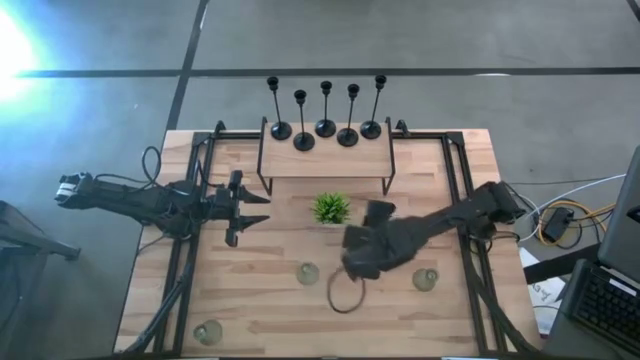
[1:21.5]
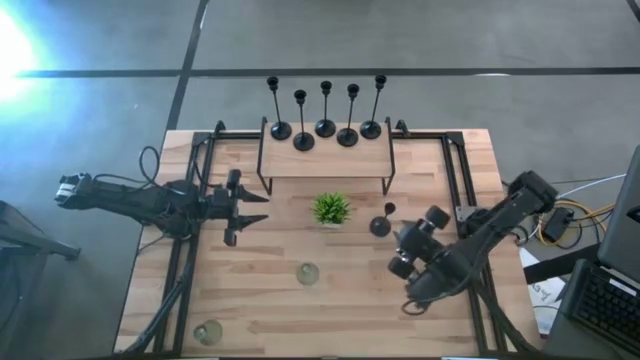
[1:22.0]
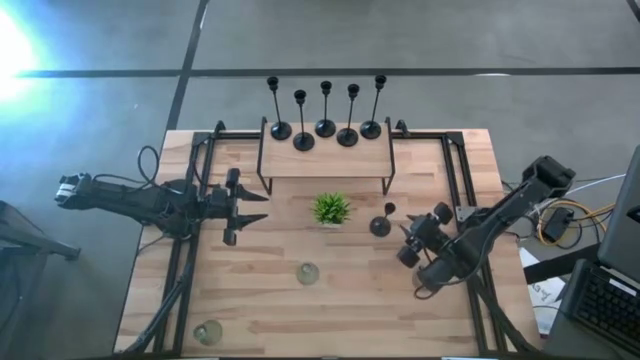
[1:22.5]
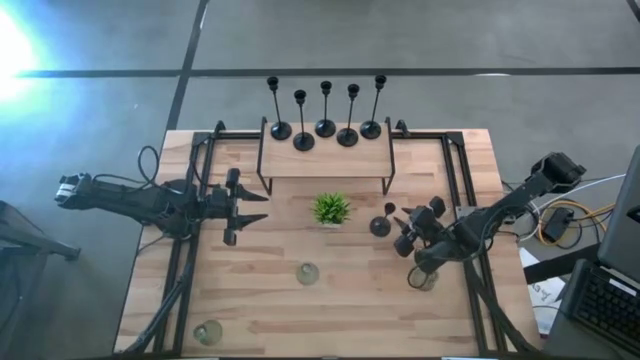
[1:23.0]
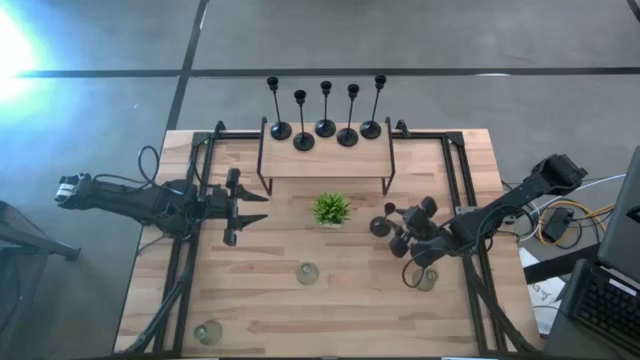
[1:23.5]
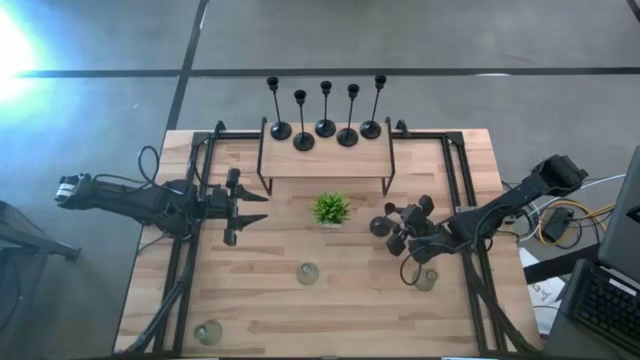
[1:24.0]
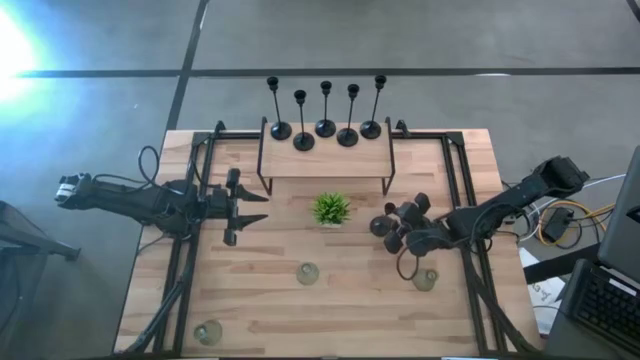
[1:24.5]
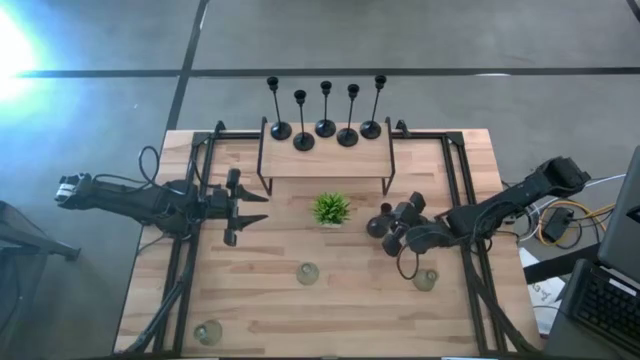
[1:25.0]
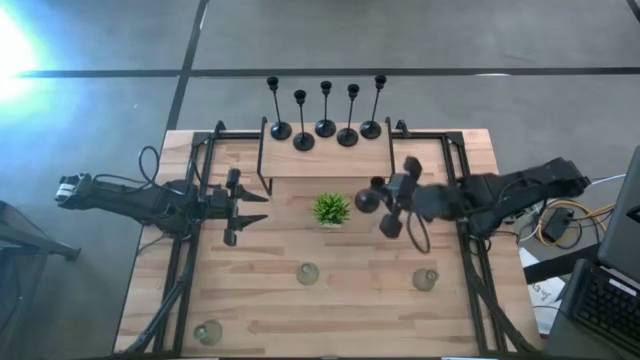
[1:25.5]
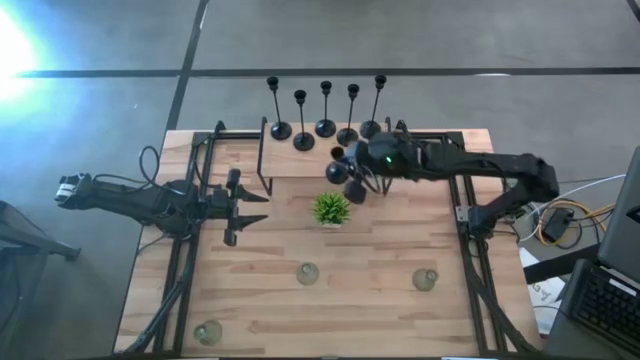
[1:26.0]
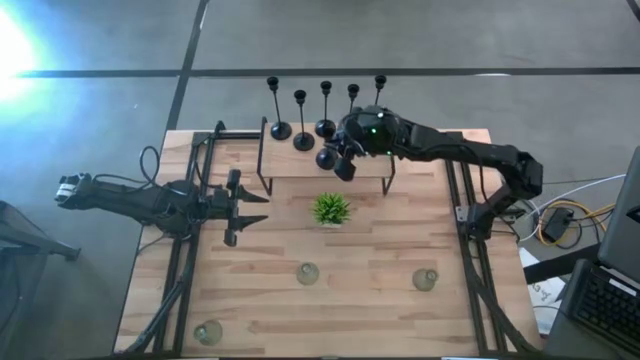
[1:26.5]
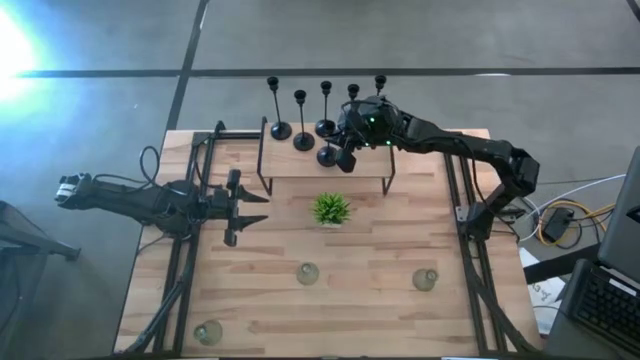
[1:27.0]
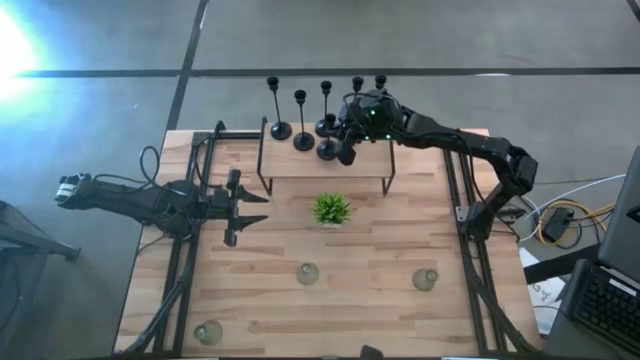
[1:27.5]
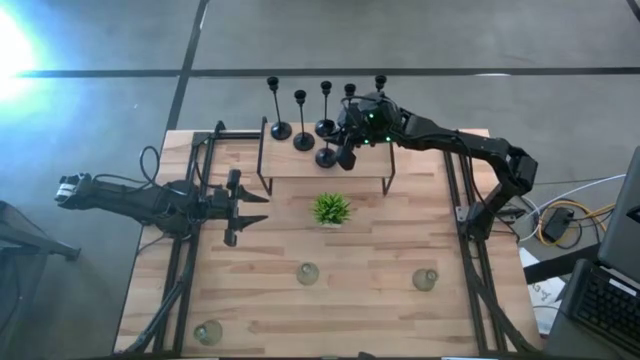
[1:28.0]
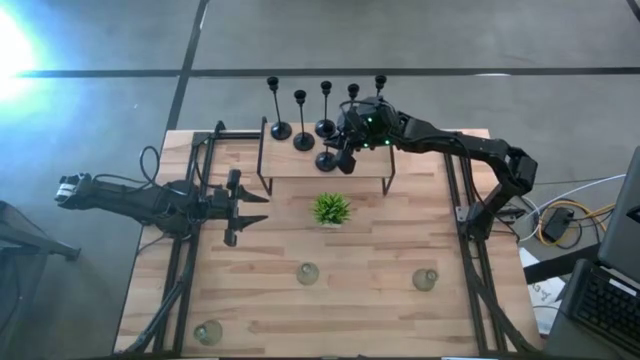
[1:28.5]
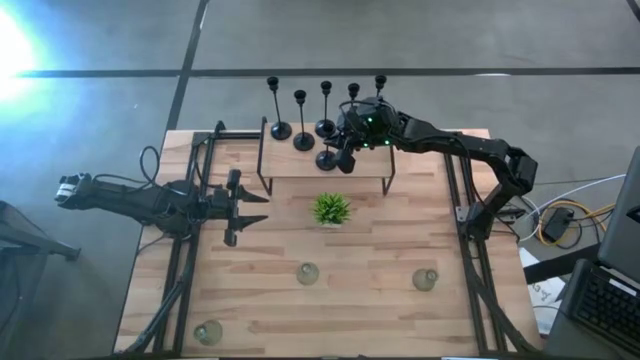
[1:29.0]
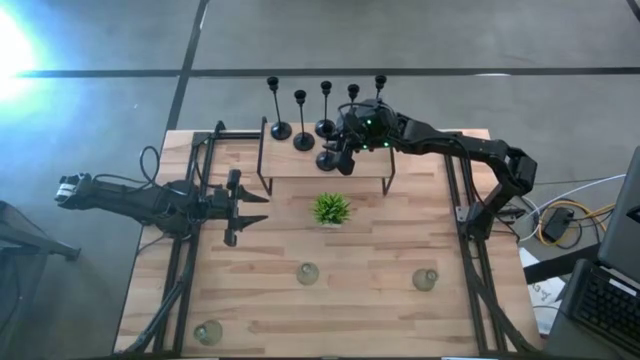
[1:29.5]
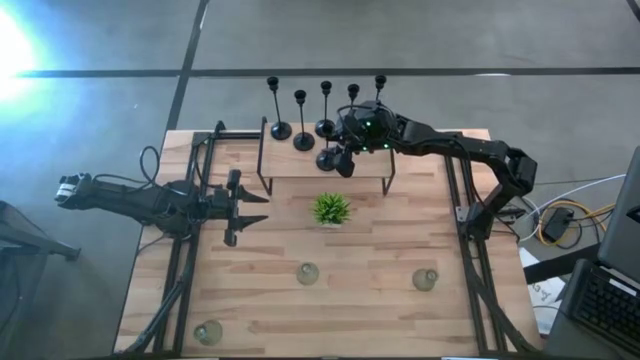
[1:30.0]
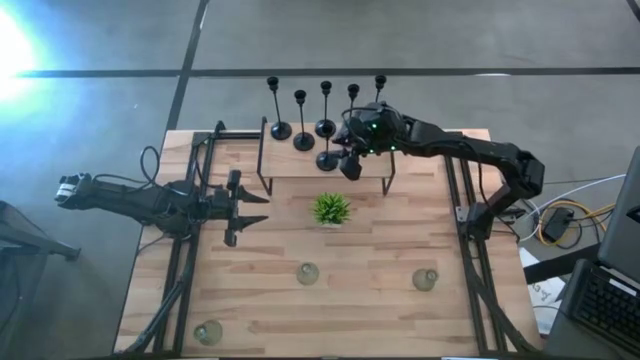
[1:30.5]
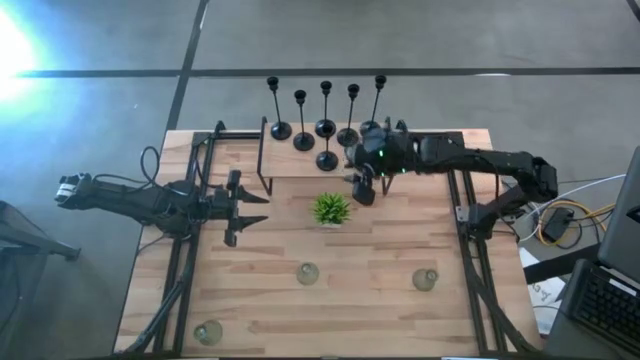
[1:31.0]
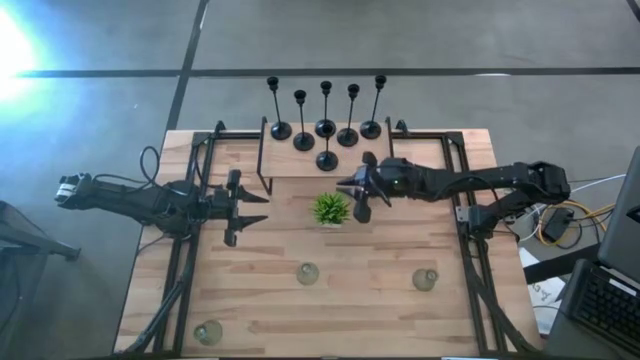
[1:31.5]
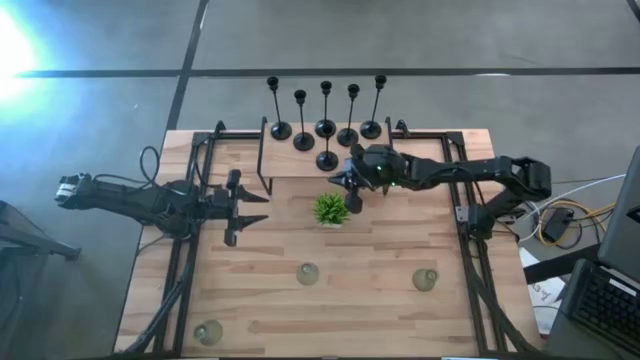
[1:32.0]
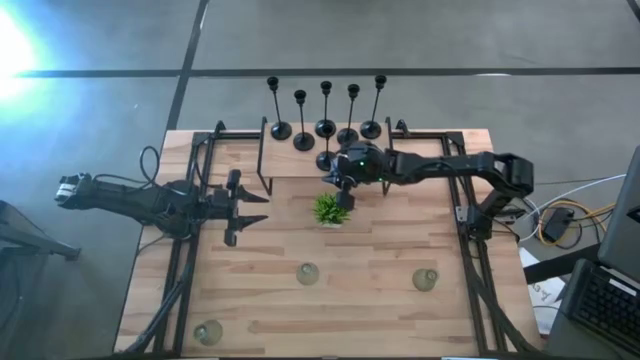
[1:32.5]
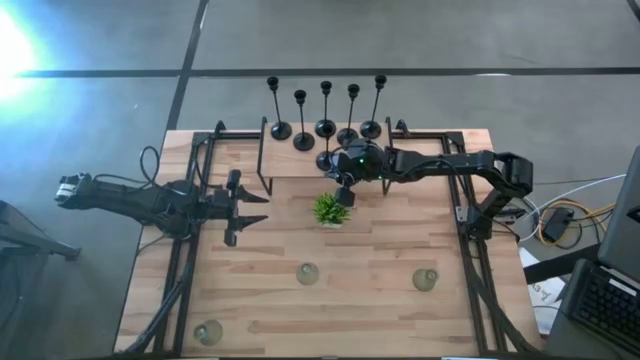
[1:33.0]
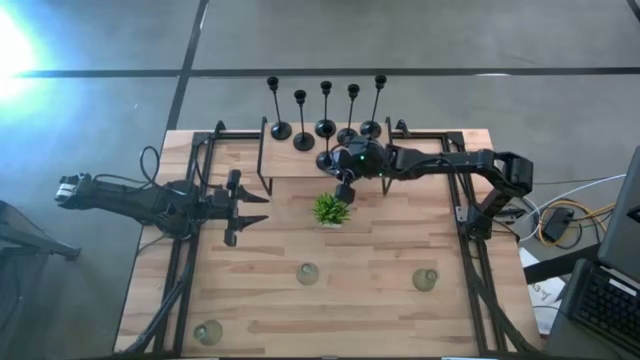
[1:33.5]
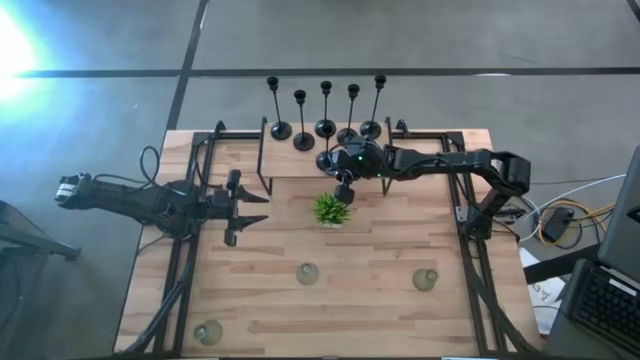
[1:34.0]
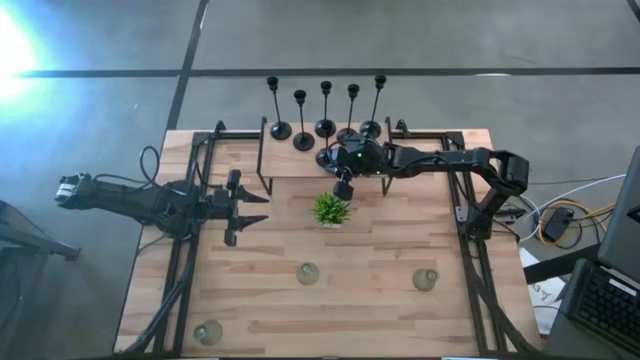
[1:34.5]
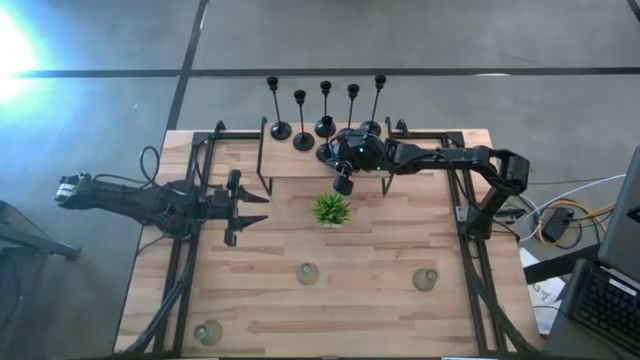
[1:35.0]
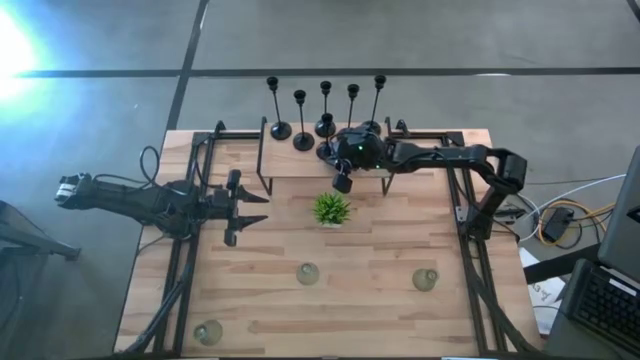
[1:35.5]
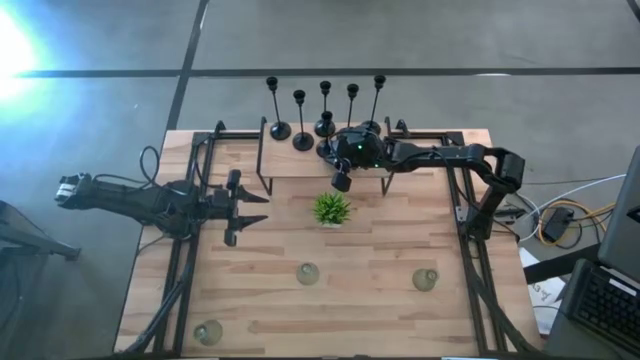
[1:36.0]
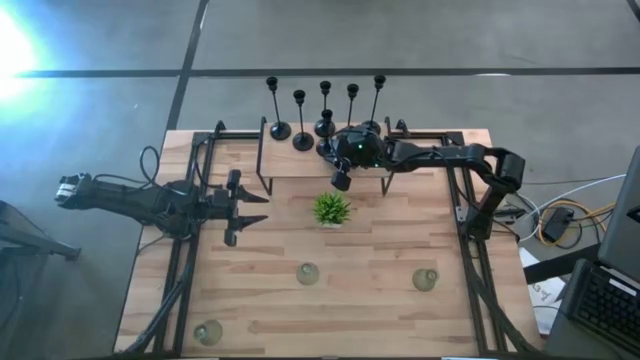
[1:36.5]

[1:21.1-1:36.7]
Task: Pick & Place candle stick holders
Put the small black candle holder on the shelf

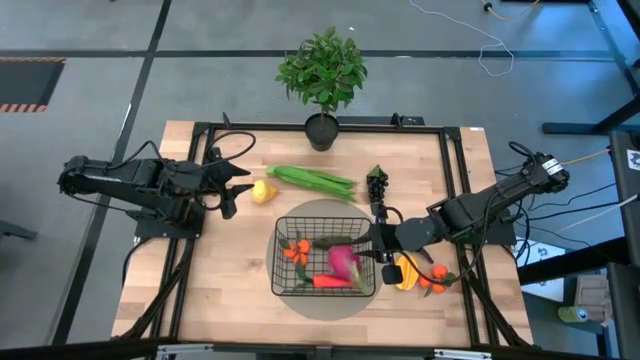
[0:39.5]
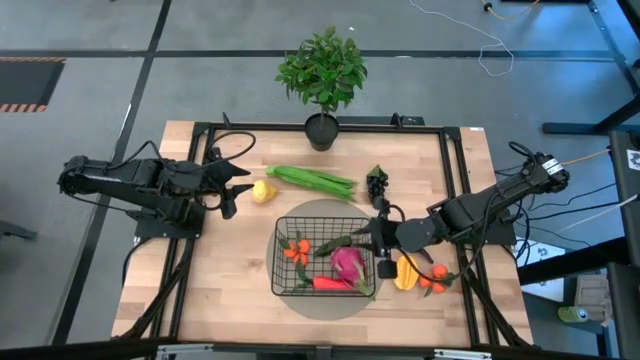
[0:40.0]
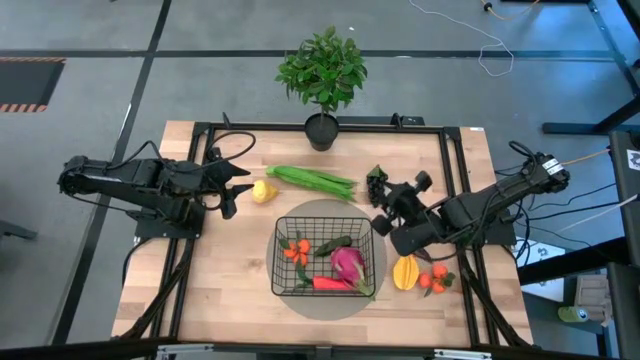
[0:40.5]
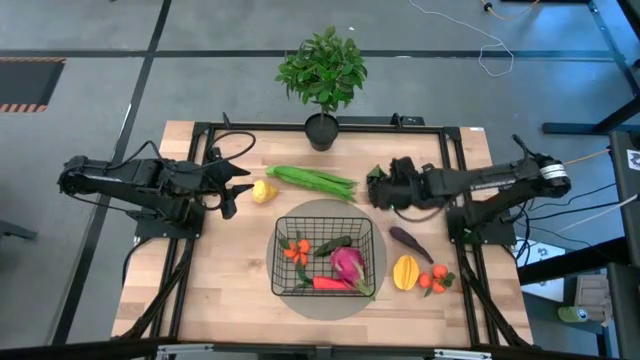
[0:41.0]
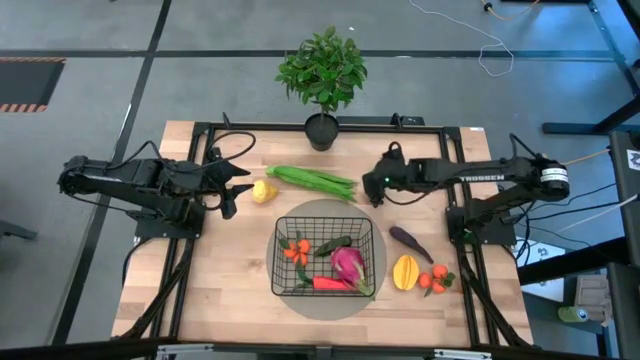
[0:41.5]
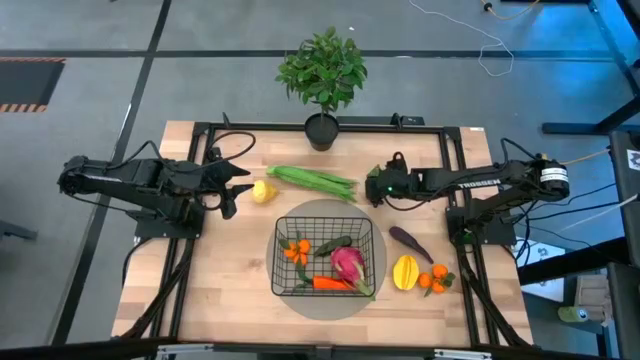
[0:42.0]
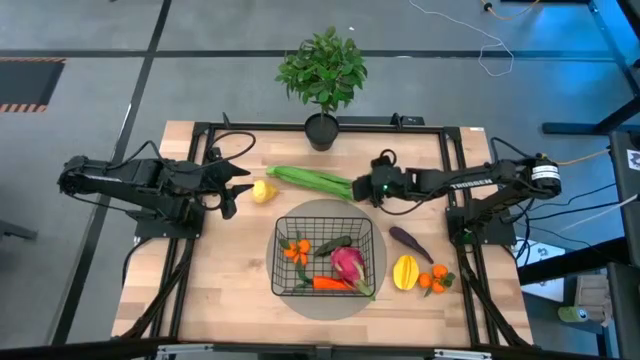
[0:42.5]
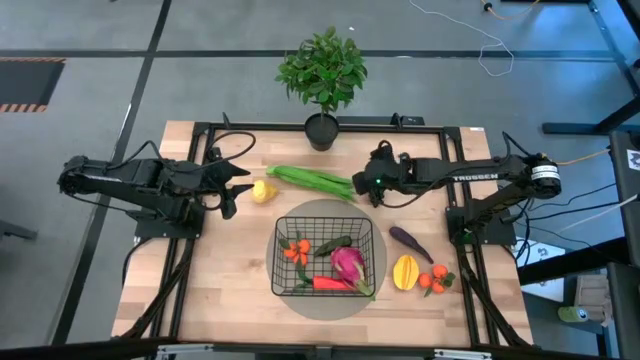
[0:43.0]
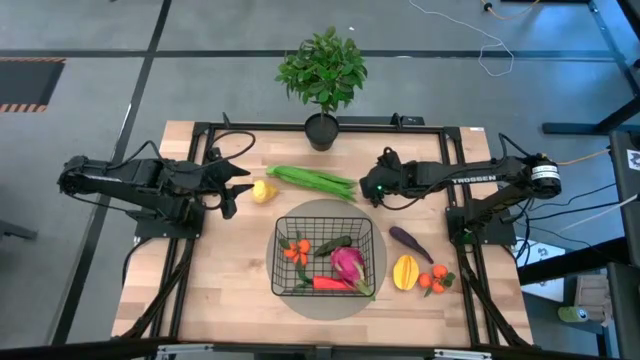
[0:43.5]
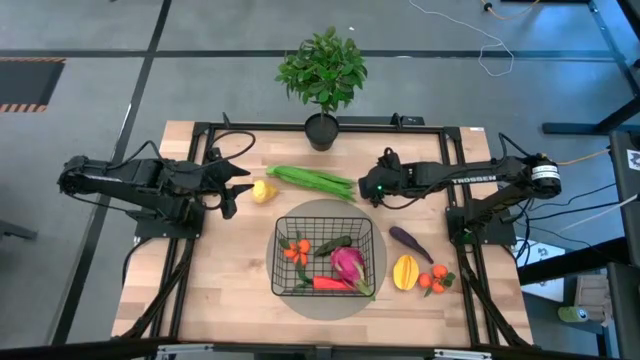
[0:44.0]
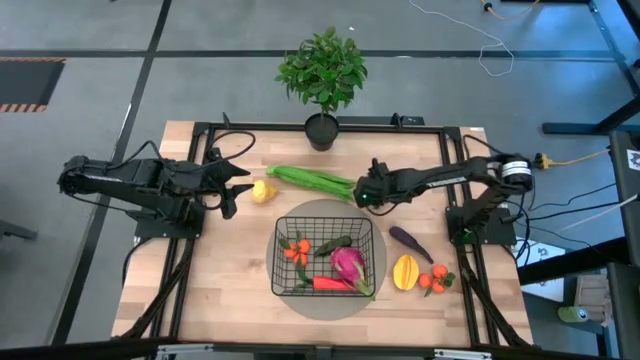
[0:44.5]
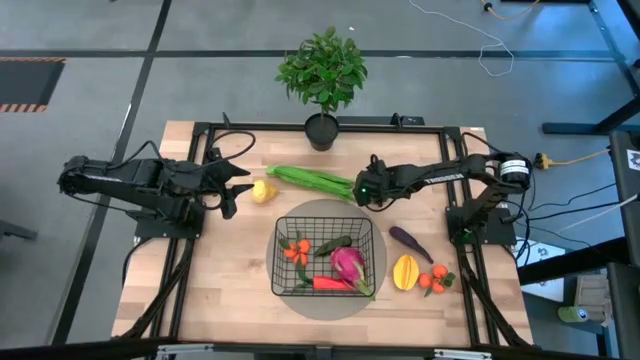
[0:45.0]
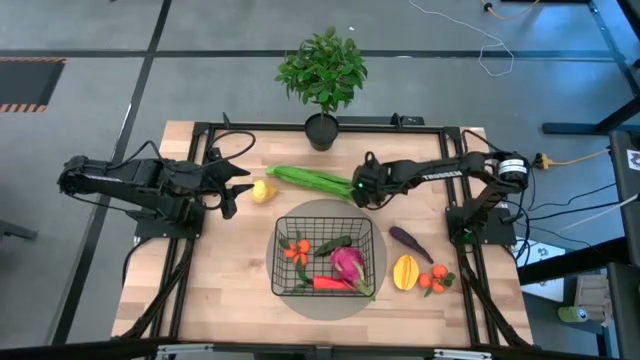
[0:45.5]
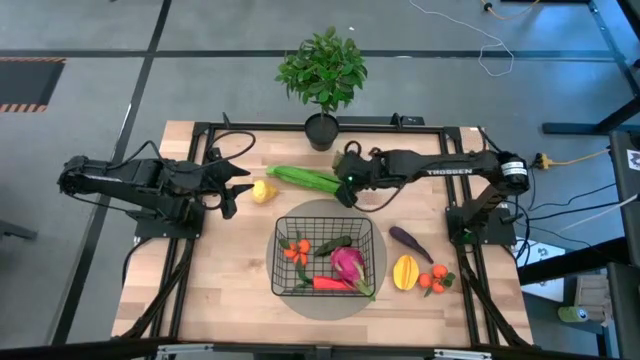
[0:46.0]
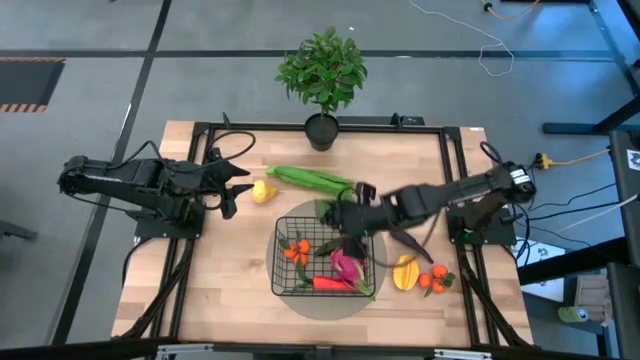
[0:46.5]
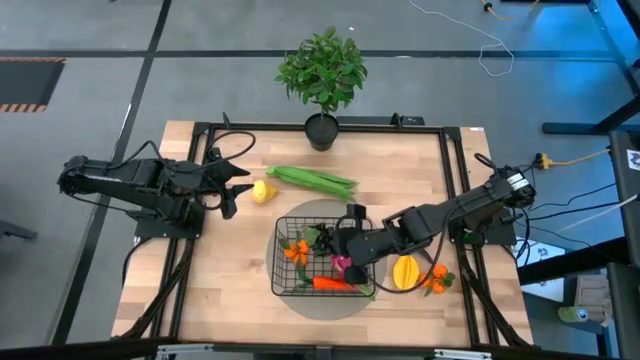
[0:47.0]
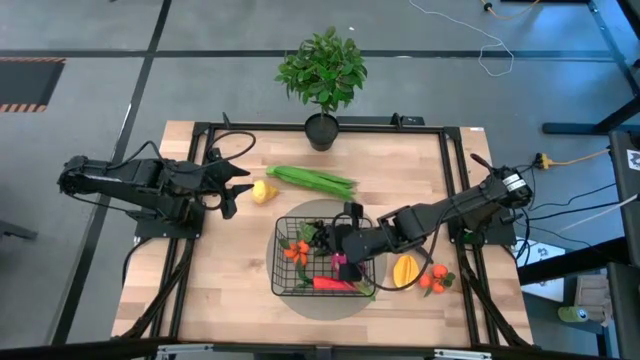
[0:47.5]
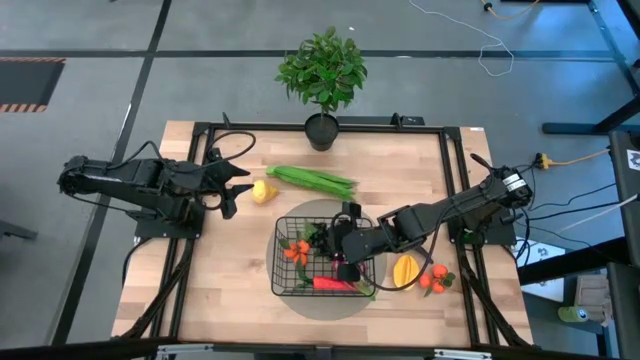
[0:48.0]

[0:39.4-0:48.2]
Task: Build produce basket
Put the grapes into the black wire basket
